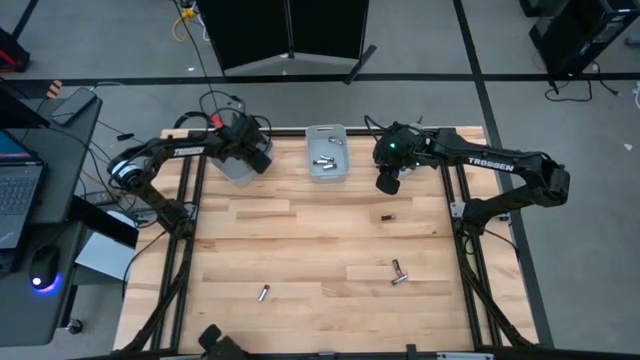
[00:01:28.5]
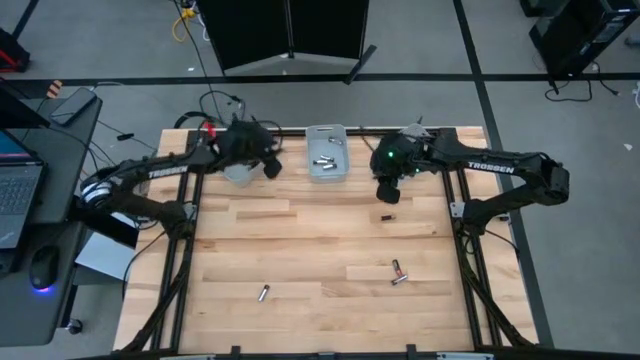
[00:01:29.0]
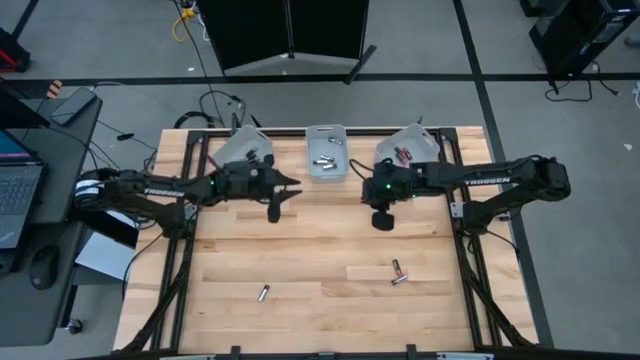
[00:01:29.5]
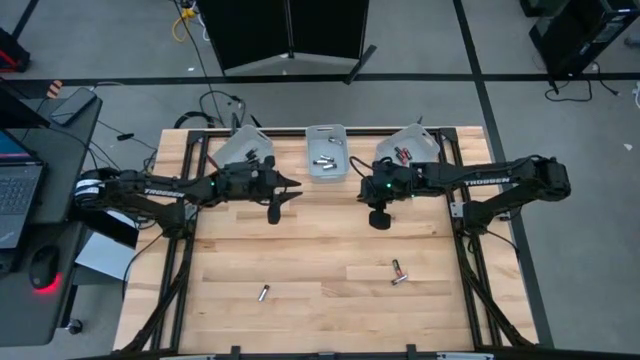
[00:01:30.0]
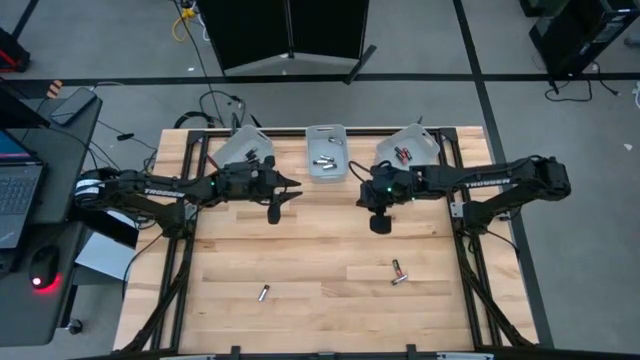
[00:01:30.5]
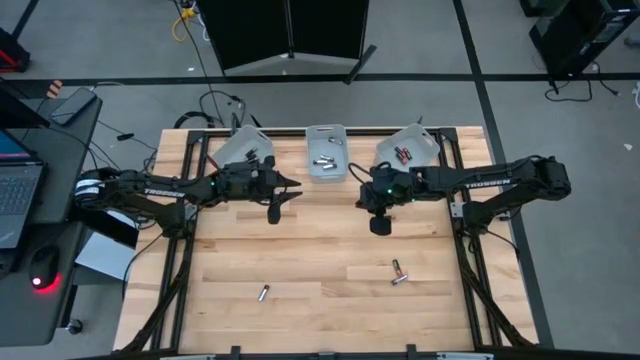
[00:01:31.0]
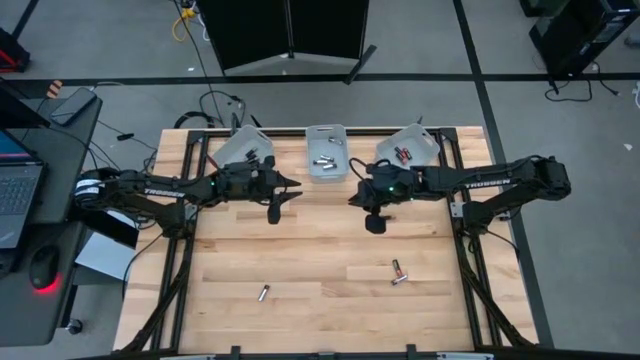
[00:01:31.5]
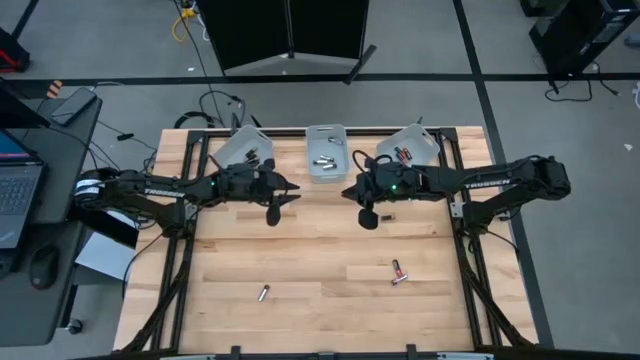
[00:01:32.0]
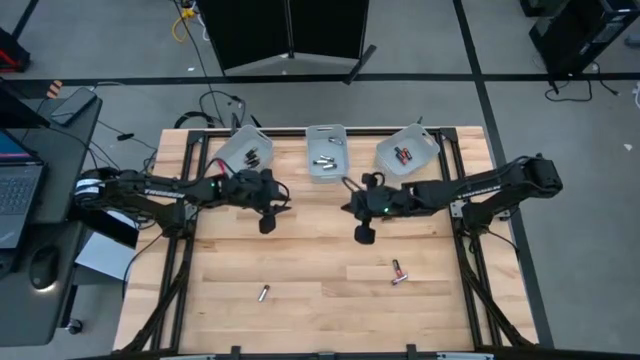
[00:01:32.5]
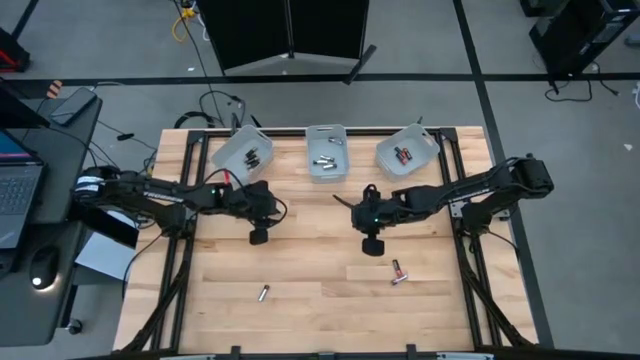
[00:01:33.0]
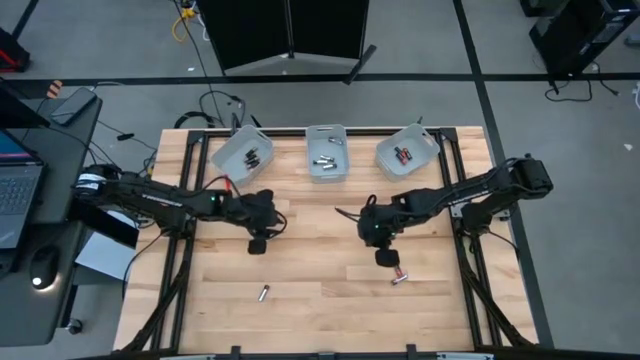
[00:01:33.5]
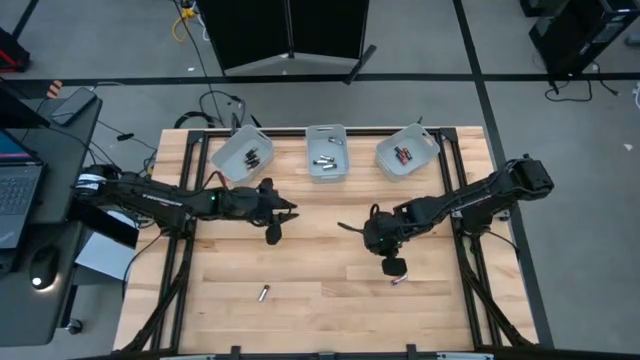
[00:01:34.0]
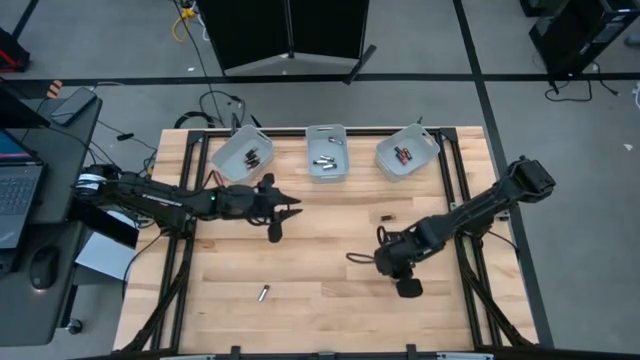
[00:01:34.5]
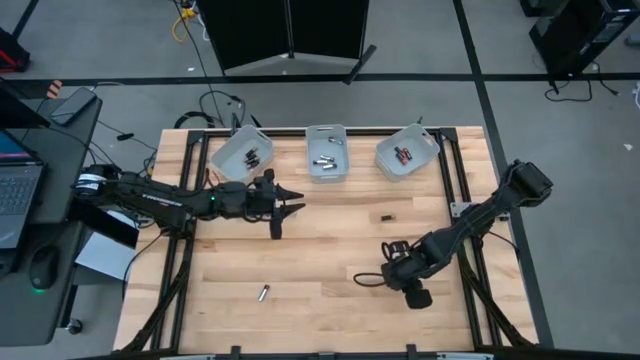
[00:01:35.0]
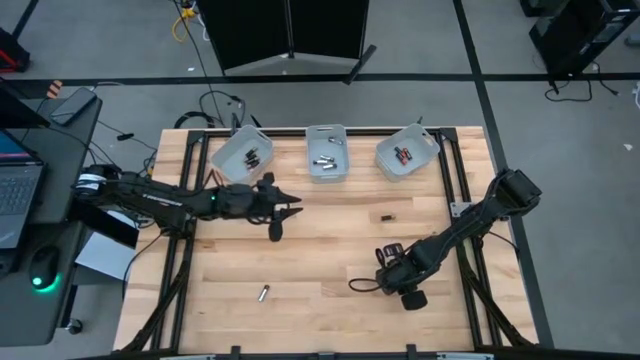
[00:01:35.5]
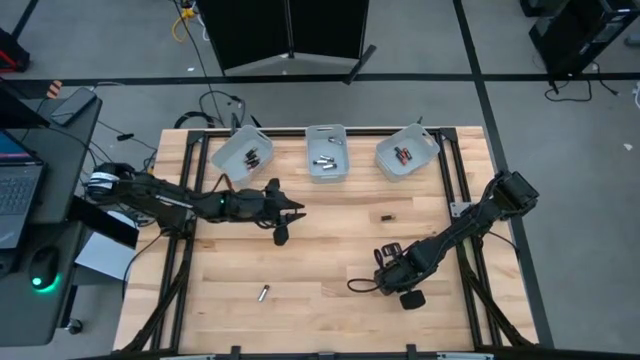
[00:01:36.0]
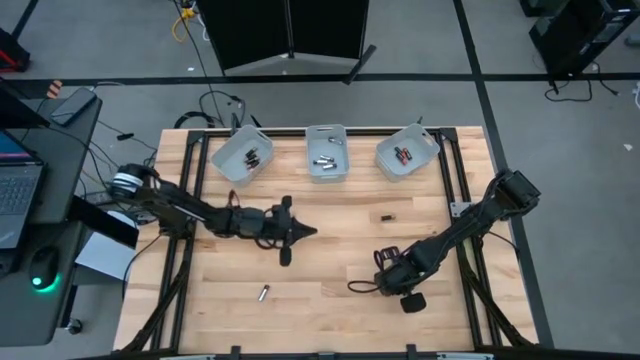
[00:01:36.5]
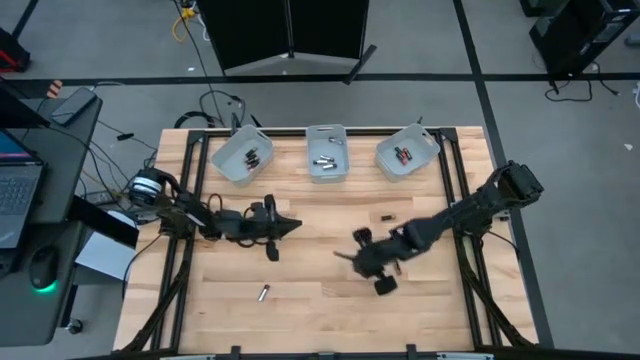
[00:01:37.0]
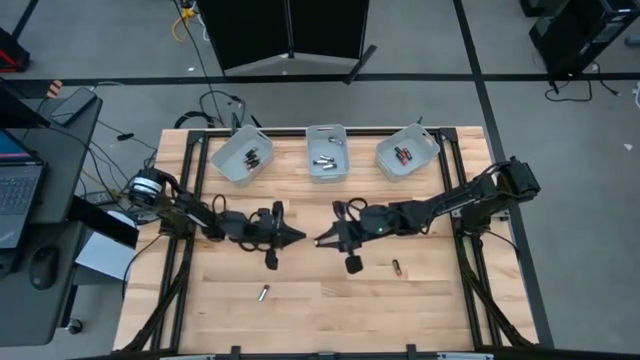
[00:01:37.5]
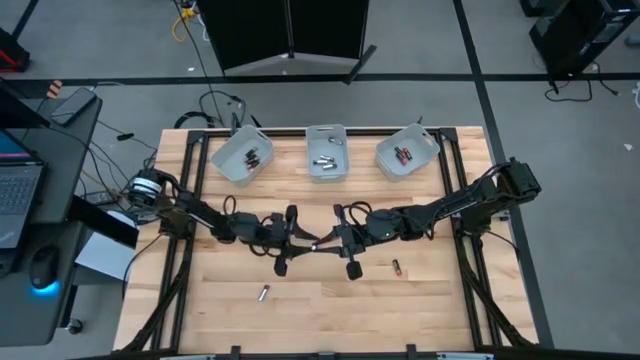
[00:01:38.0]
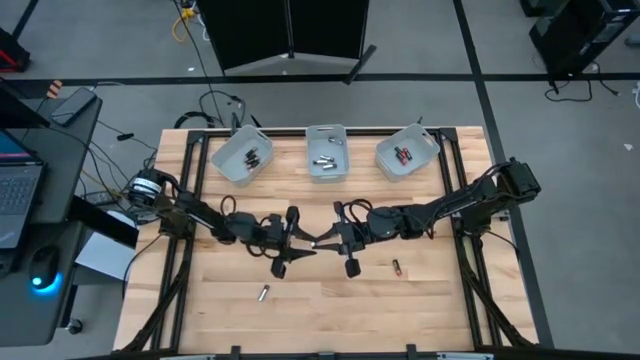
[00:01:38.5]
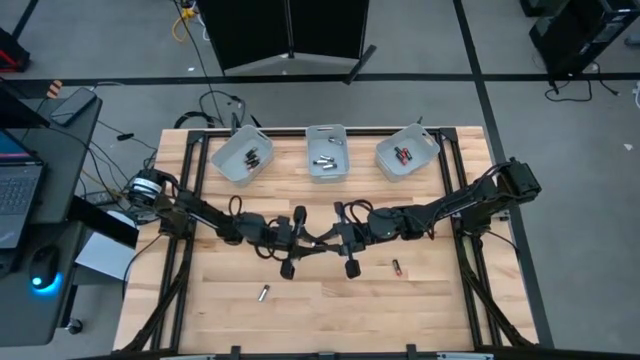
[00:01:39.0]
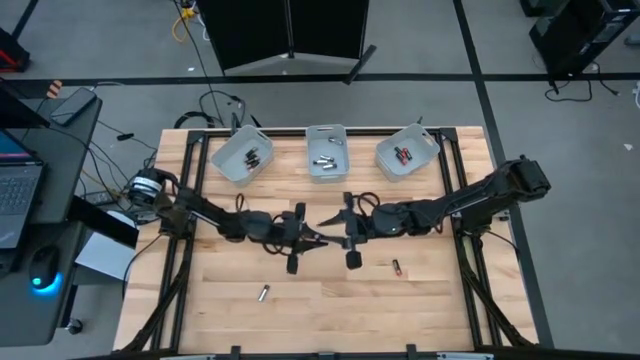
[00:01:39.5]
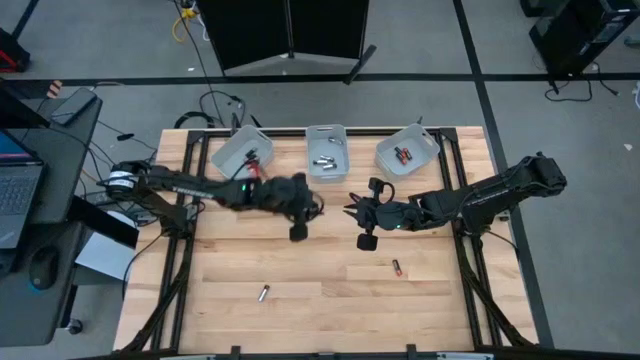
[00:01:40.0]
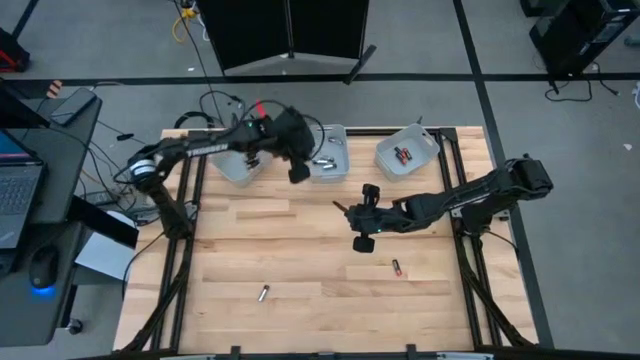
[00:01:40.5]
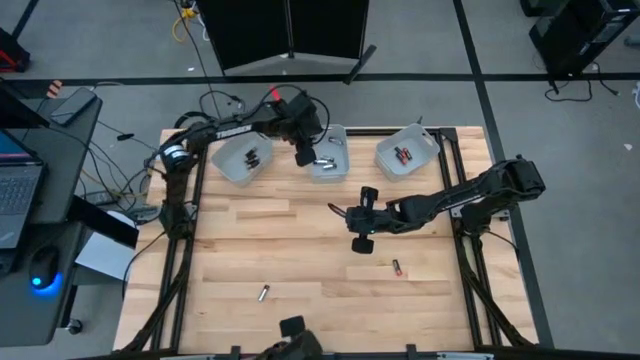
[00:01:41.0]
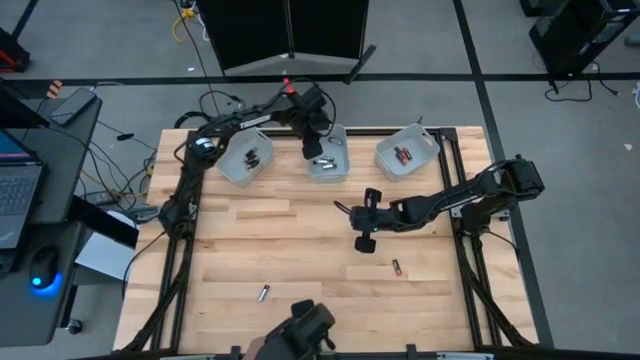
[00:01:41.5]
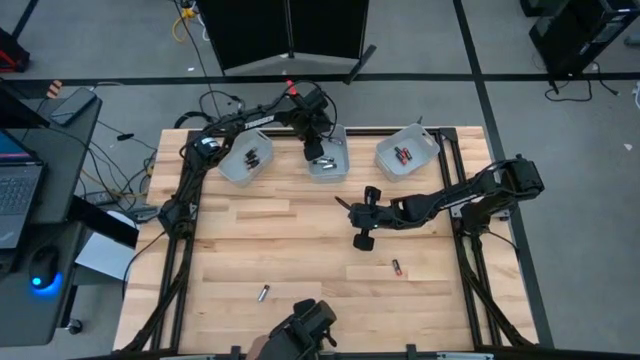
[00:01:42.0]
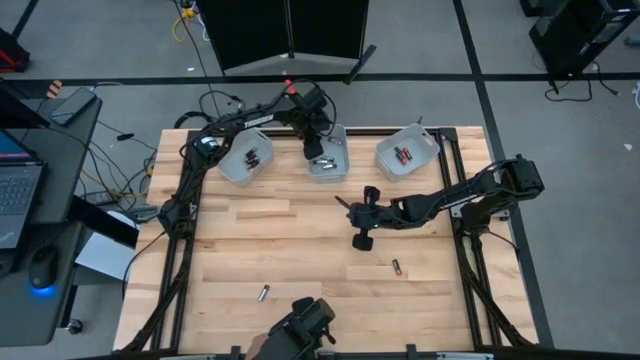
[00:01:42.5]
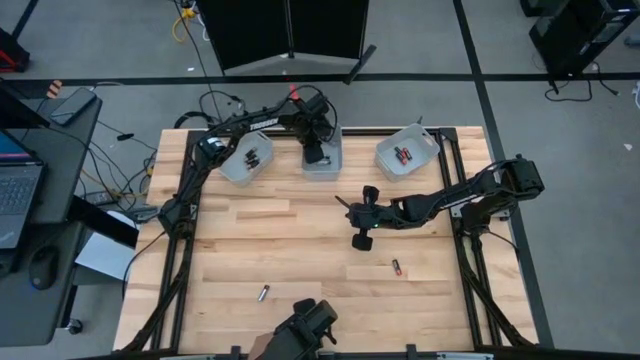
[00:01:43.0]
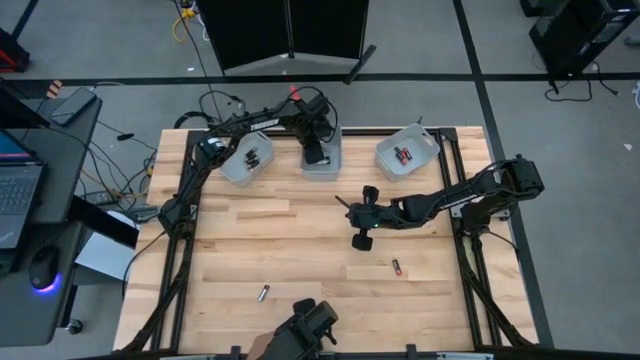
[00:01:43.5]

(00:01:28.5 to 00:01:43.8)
Task: Sort batteries
Put the silver battery into the middle gray bin
